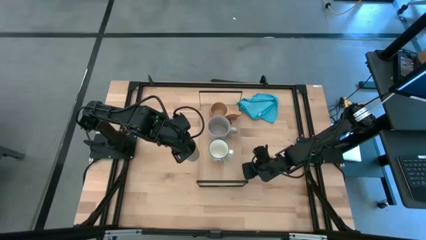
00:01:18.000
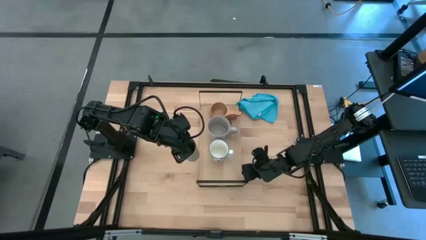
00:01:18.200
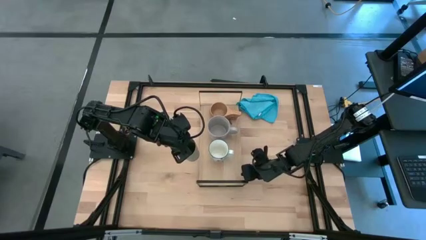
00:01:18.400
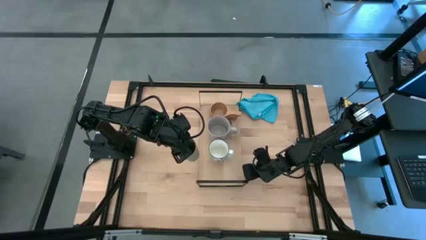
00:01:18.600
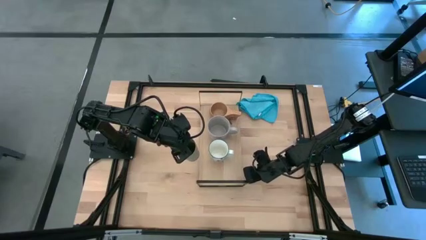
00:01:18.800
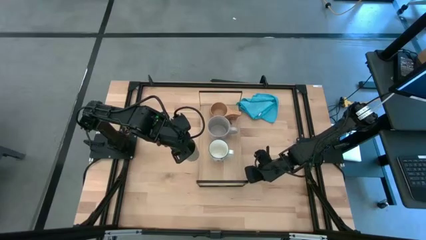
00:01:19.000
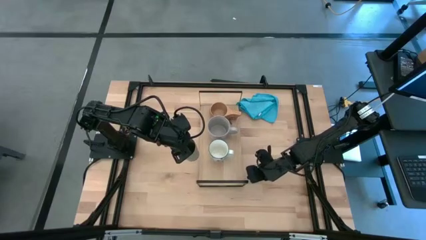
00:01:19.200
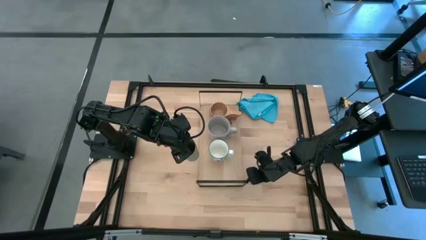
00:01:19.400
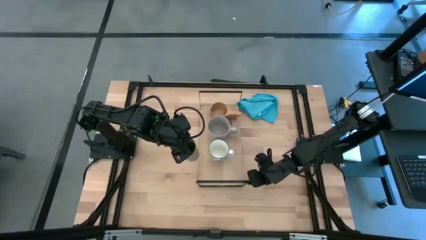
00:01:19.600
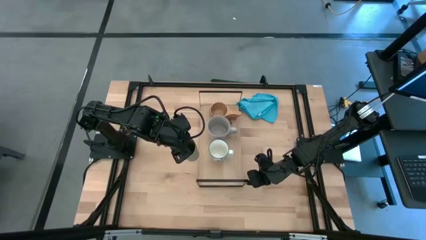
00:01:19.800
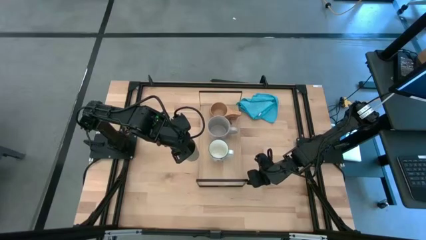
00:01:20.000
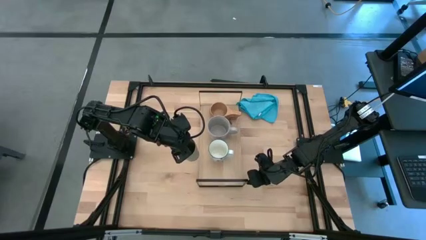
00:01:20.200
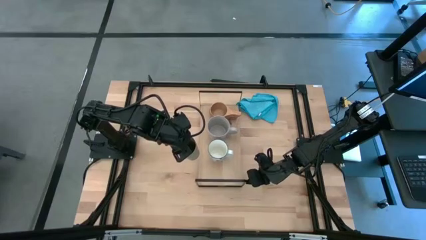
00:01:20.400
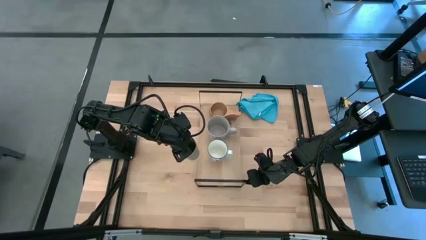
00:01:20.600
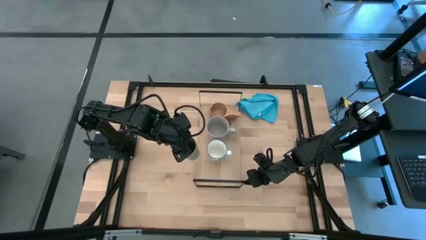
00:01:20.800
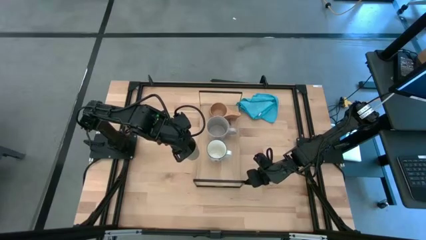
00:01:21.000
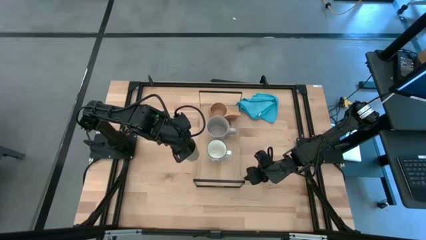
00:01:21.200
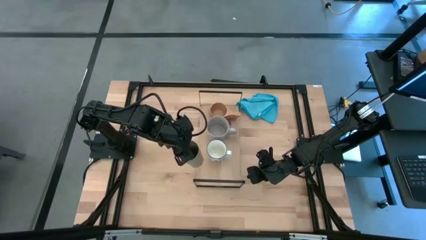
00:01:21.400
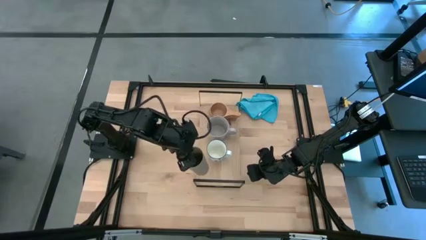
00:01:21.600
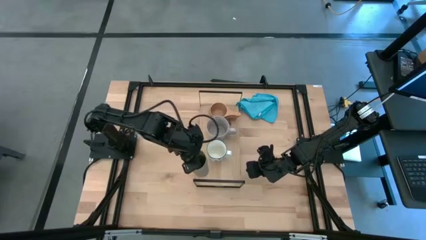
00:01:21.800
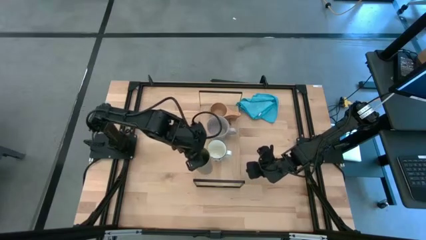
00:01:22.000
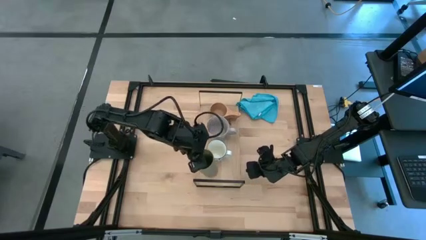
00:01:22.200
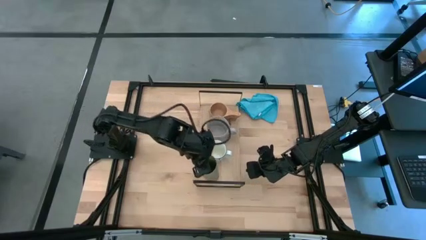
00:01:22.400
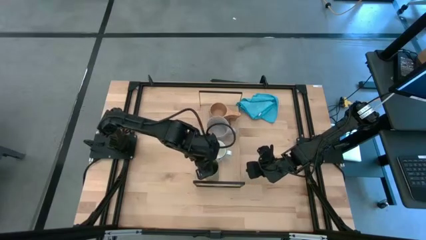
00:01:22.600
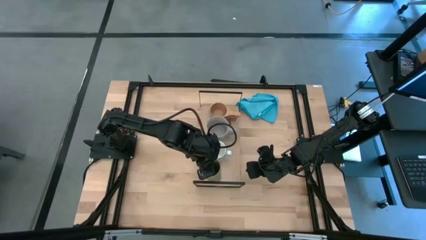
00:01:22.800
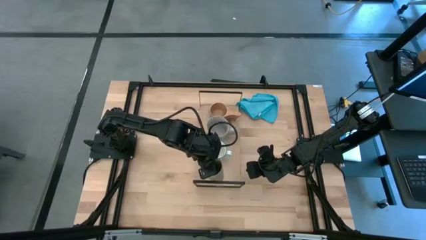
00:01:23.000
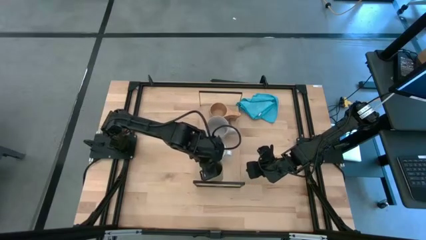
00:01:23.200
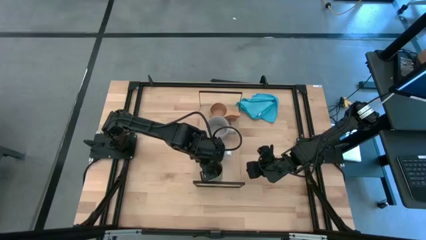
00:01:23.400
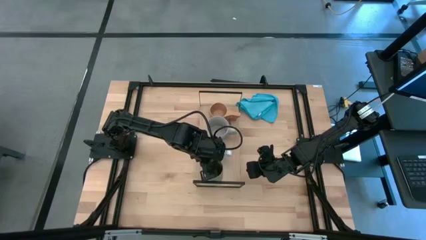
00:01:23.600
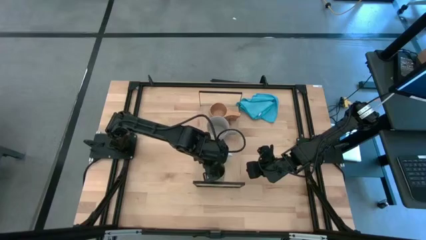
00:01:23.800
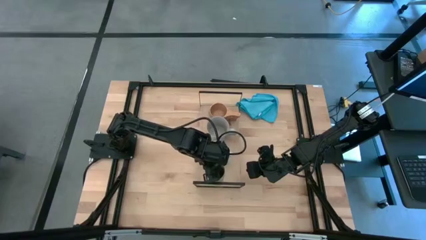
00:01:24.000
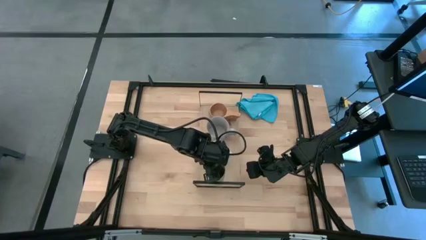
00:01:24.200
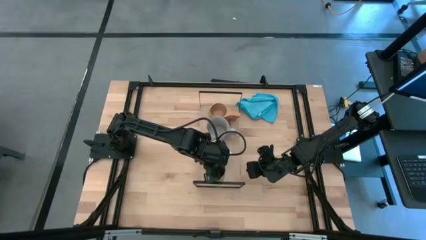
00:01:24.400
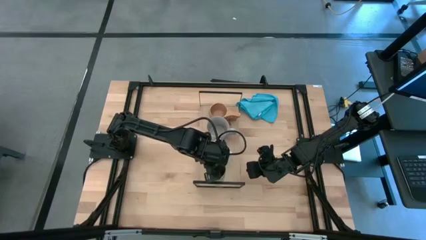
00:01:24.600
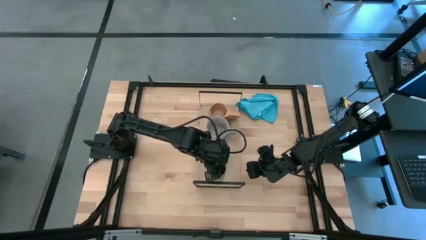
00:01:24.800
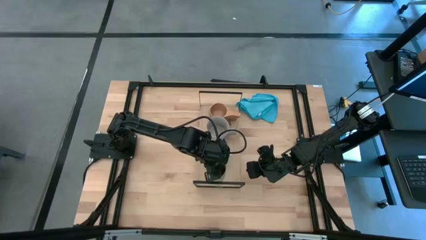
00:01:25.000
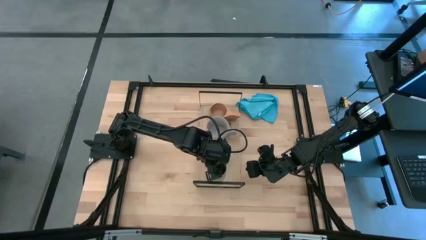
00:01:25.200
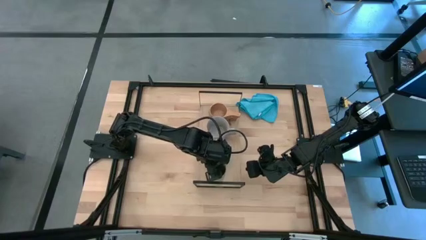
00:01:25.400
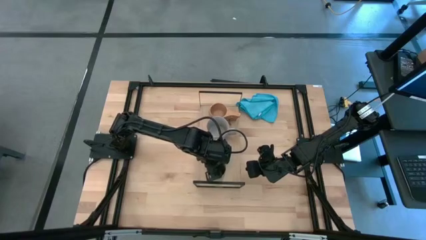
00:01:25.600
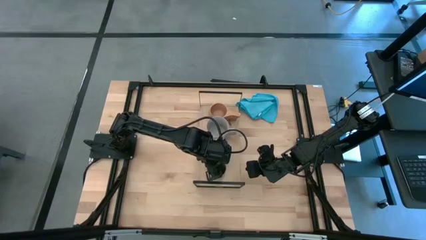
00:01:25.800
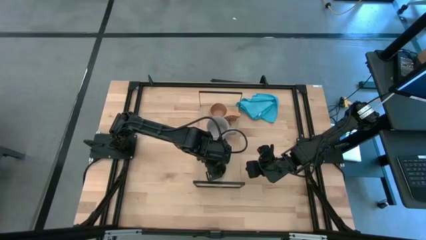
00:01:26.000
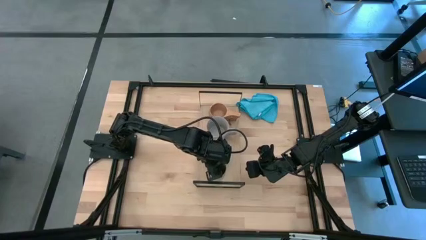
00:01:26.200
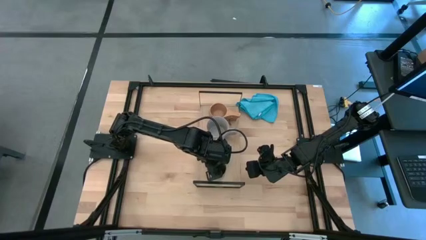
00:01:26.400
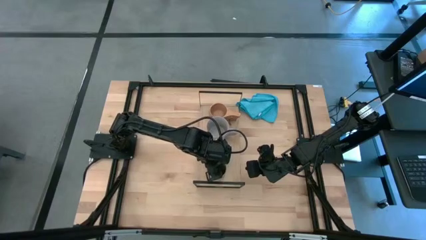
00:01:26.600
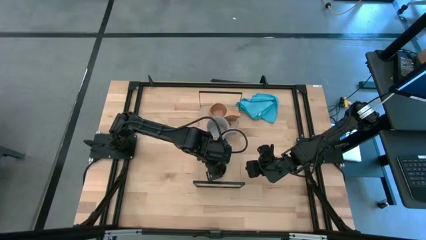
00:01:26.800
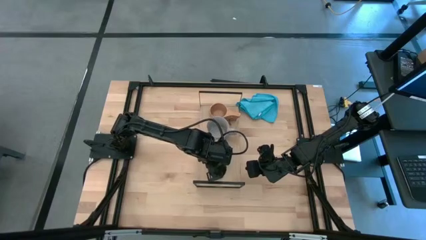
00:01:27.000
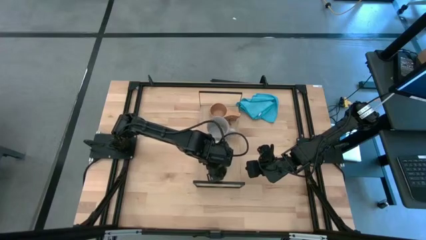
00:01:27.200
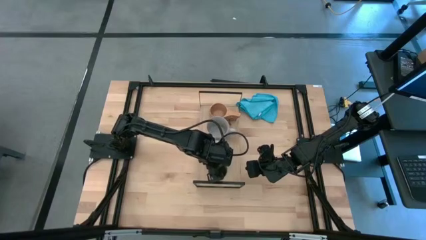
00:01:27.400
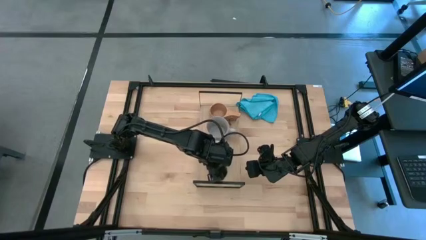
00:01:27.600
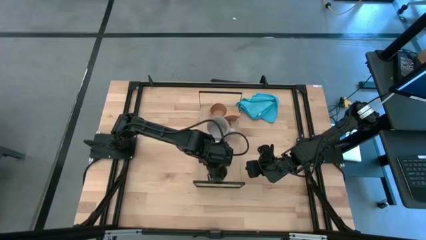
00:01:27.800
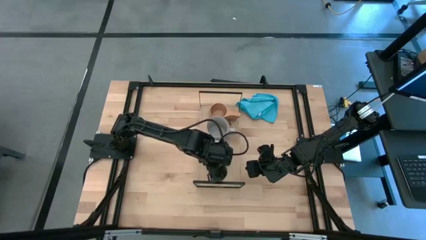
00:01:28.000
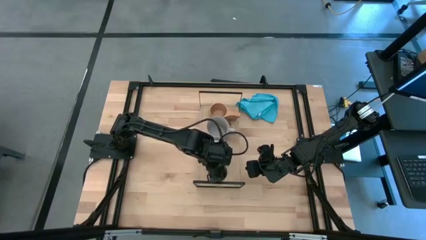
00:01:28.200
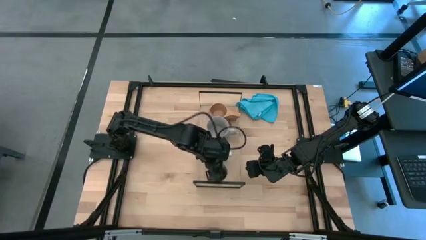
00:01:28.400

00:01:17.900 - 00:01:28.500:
Task: Stack small to large cups/mugs on shelf
Put the gray cup on the shelf

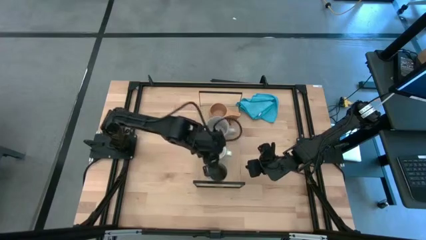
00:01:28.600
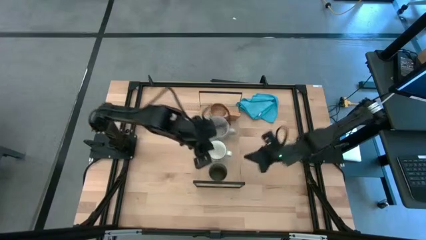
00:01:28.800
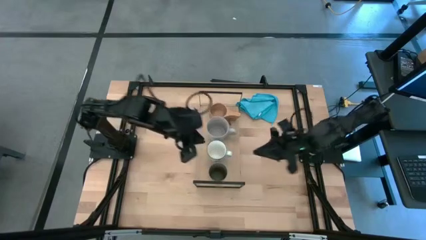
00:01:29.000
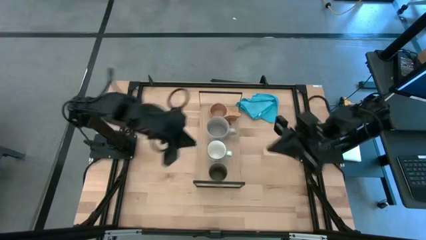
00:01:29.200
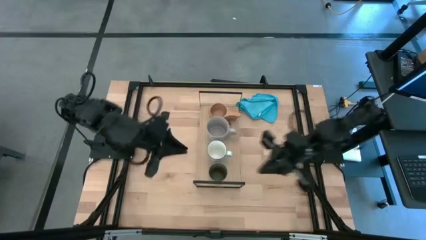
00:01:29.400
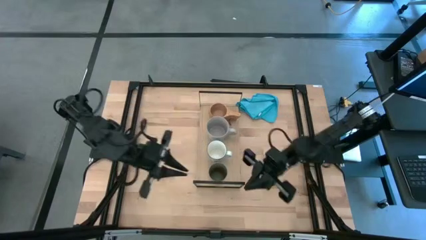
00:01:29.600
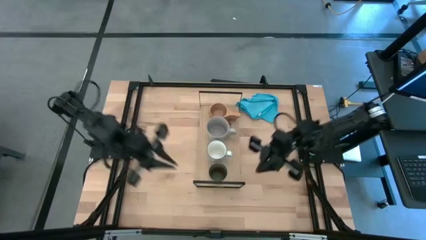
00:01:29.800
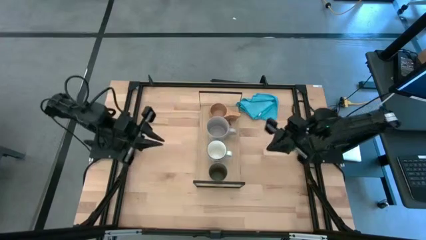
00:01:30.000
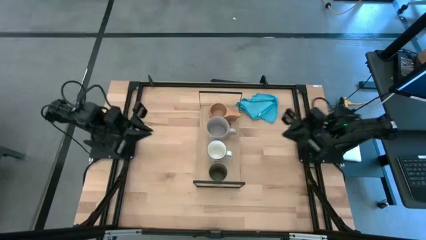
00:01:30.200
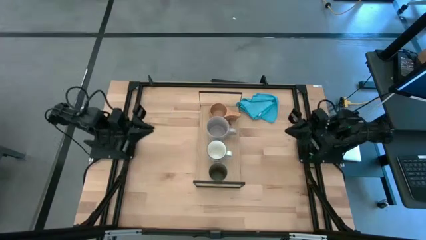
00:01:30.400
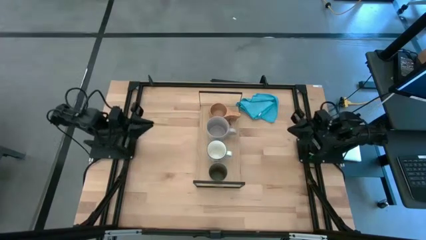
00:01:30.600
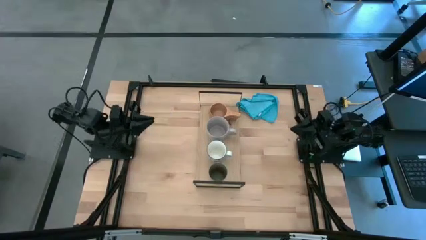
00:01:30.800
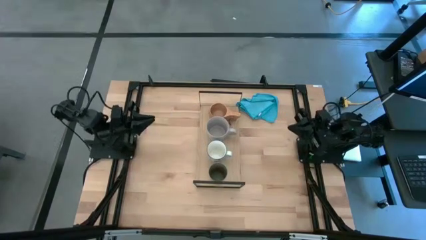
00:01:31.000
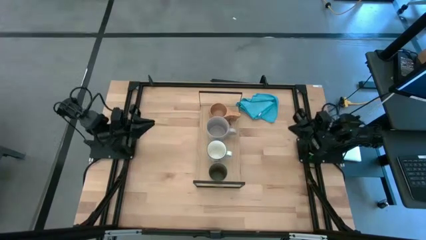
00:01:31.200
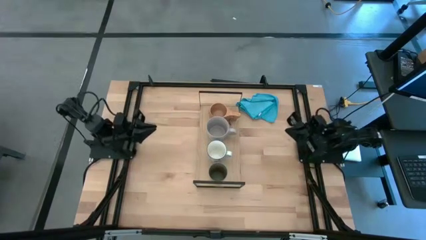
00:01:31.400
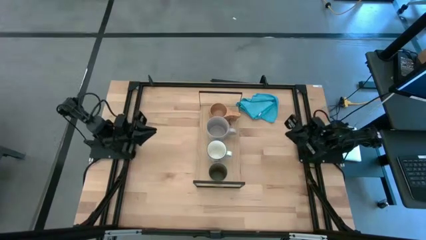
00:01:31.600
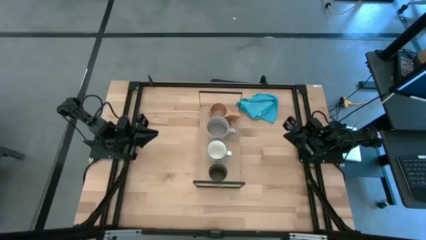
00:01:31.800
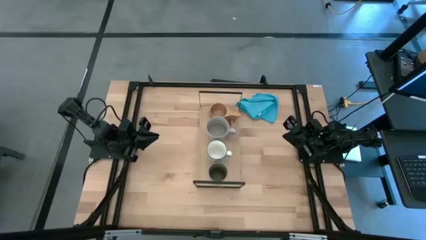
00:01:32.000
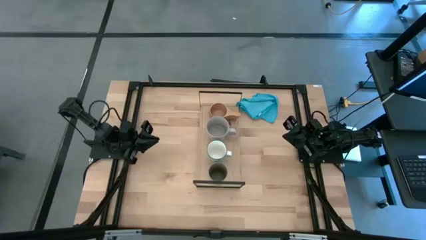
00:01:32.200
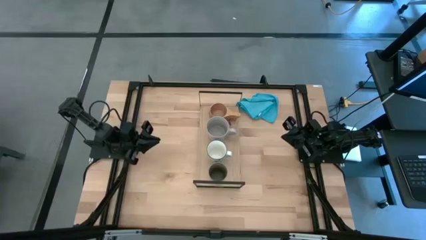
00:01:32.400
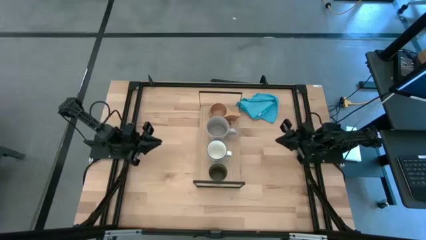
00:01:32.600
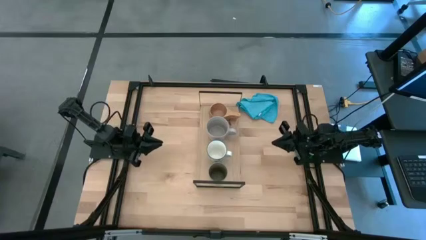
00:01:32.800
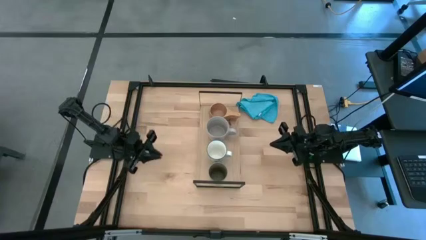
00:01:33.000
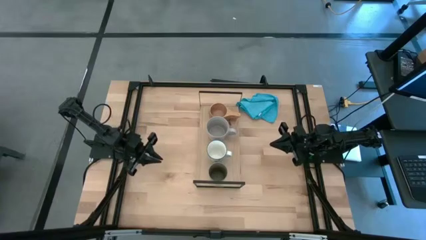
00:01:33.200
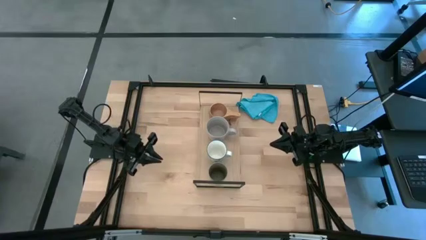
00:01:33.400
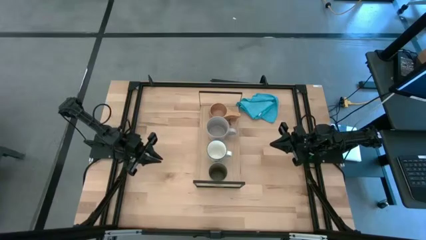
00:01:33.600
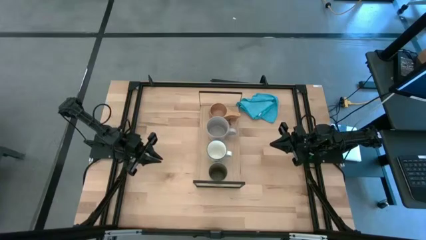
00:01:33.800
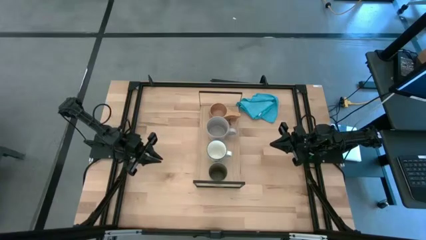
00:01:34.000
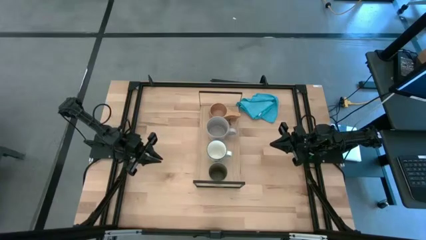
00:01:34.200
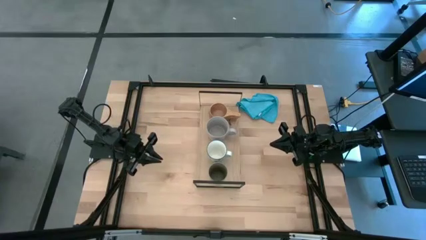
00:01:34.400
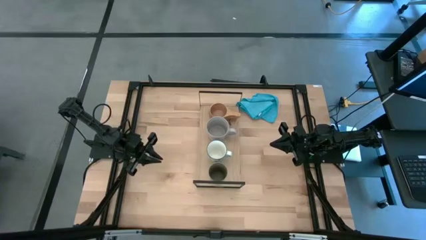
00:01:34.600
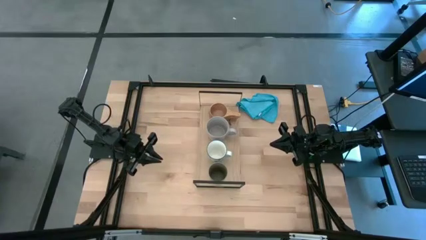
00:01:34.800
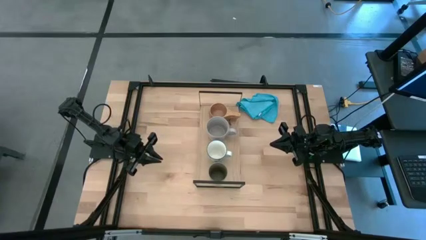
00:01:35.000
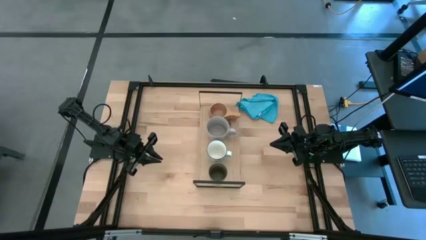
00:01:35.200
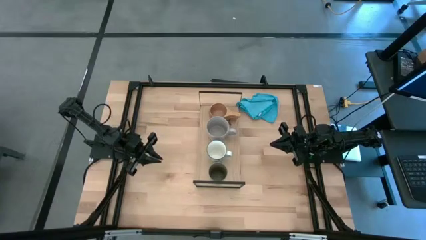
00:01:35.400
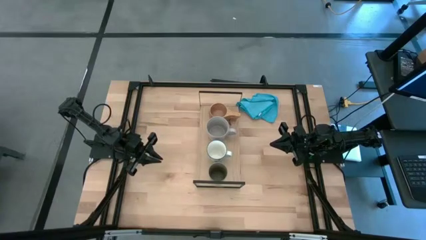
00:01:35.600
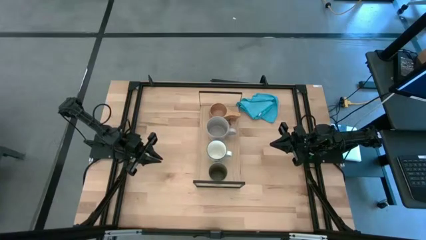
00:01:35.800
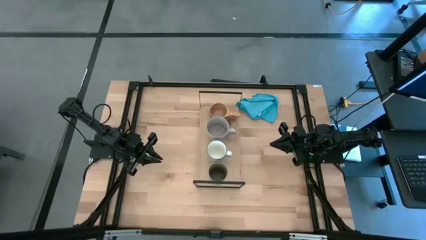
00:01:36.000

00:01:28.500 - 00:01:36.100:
Return to Home Position
